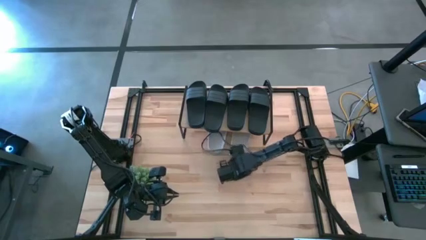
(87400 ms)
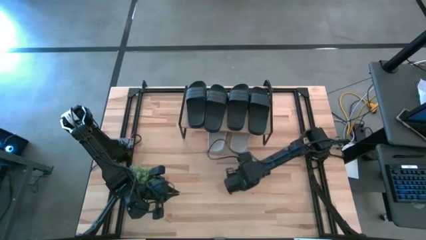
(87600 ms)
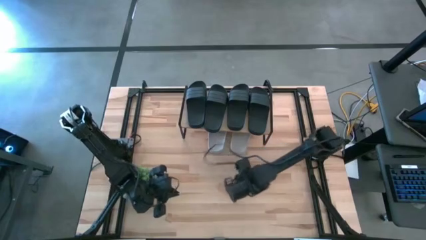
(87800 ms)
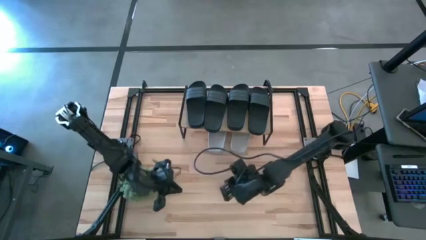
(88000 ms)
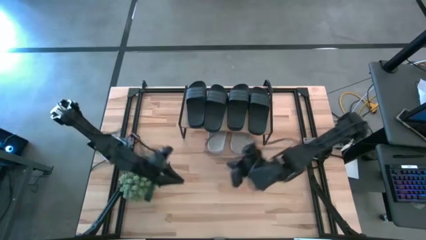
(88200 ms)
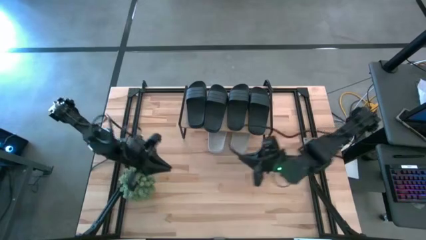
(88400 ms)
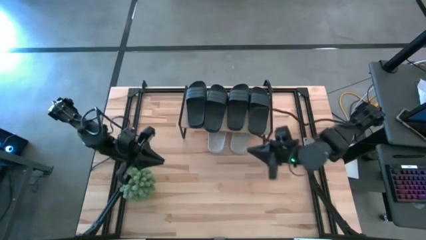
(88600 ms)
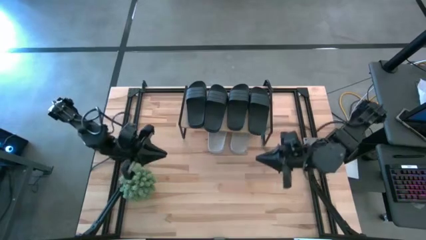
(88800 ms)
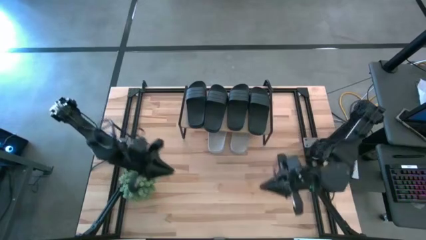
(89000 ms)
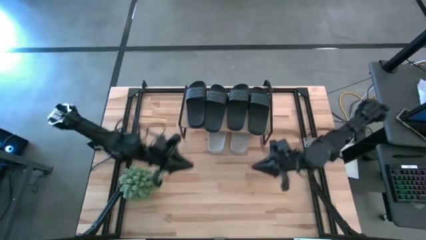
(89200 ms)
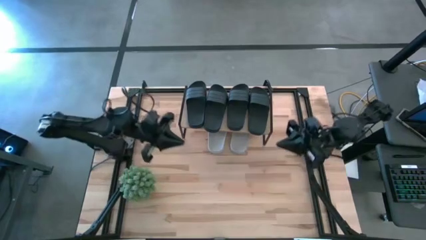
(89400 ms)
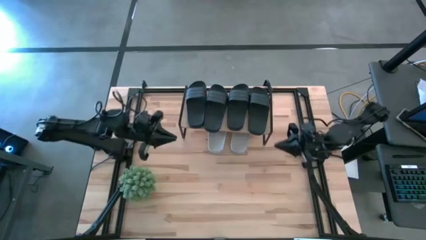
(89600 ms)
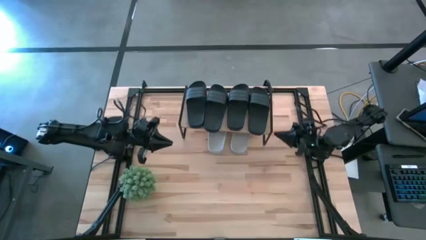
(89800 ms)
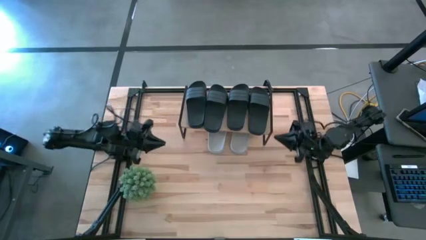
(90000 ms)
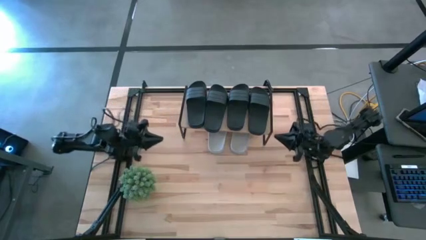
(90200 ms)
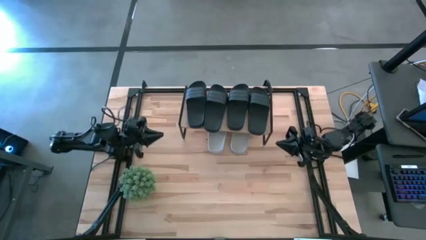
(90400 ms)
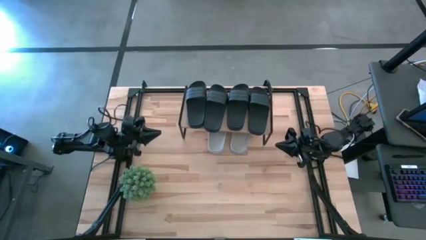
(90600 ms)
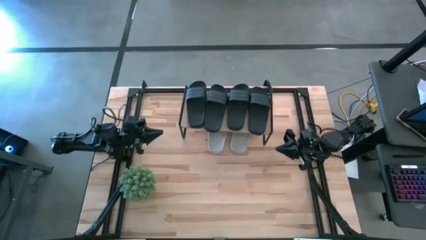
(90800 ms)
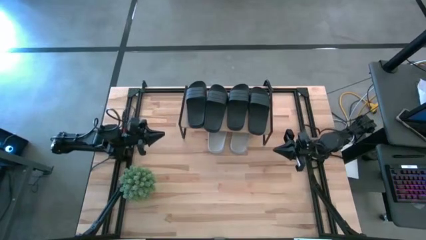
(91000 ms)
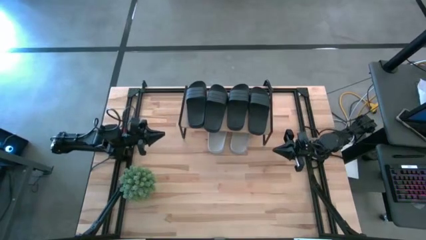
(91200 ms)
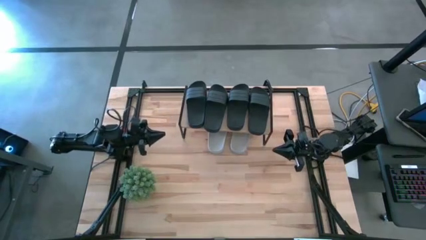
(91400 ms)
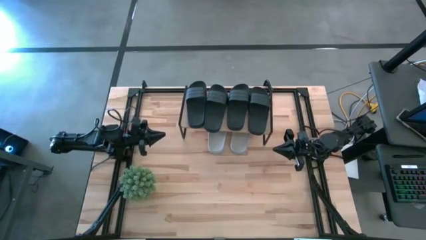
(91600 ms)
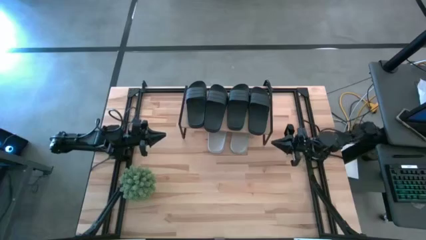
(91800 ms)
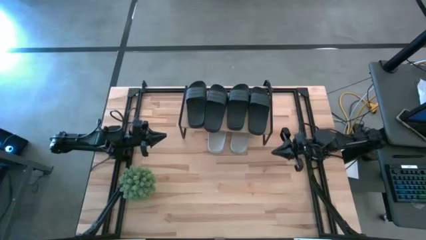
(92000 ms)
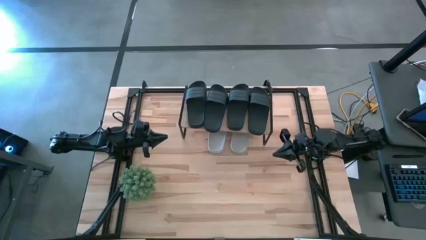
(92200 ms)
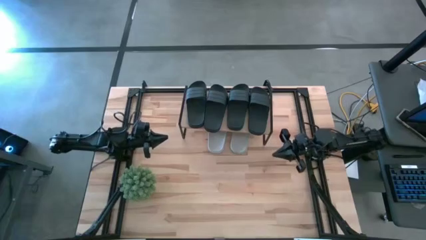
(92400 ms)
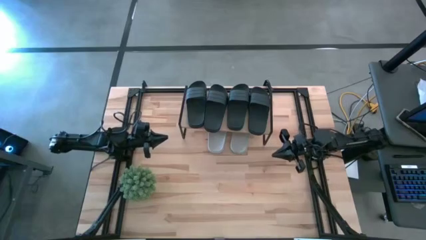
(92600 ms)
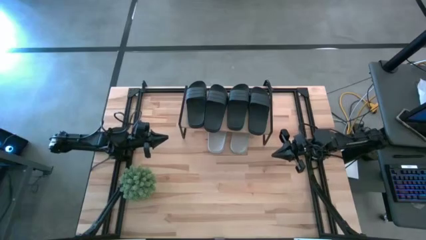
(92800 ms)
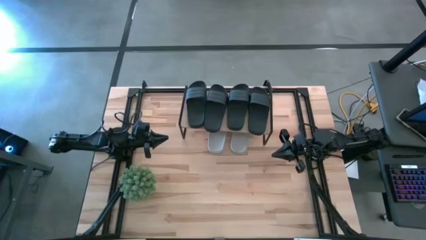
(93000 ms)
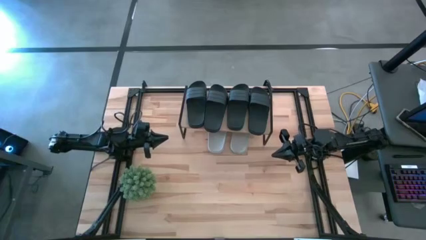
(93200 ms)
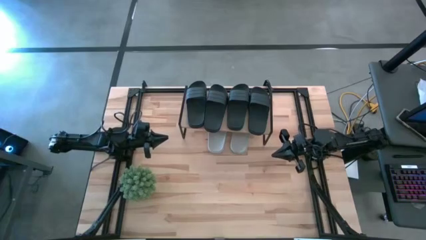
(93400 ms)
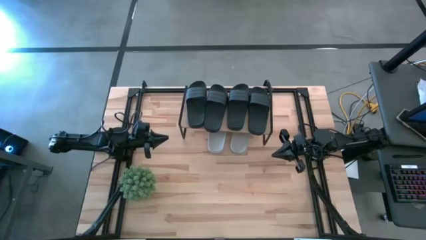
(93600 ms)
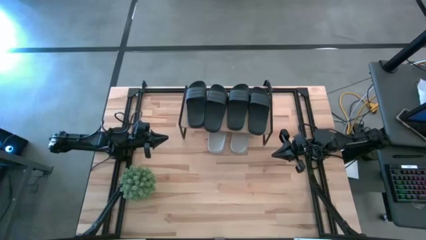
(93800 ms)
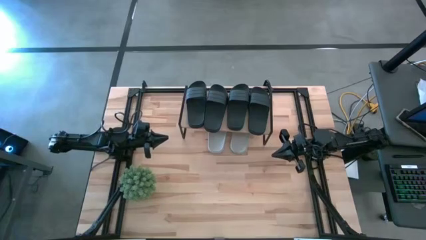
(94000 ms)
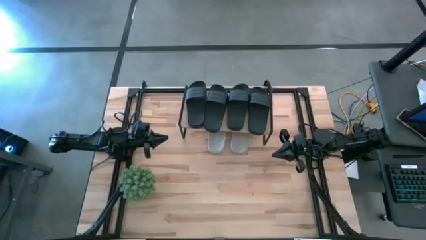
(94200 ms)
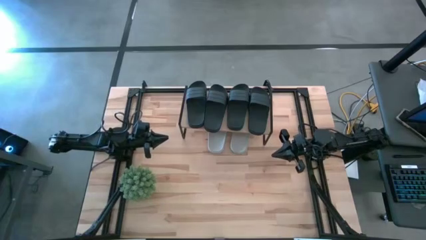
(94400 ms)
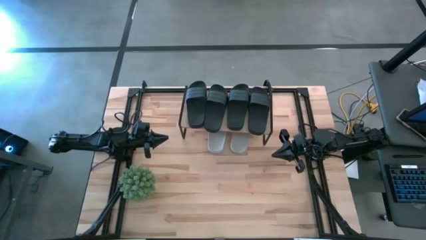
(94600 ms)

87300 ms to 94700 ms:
Task: Pick and place slides into the shelf
Return to Home Position

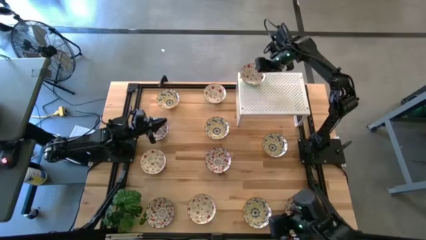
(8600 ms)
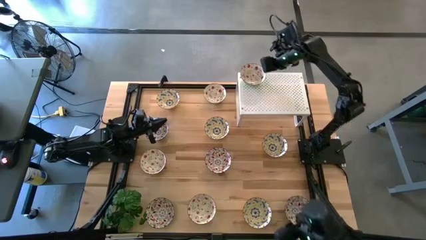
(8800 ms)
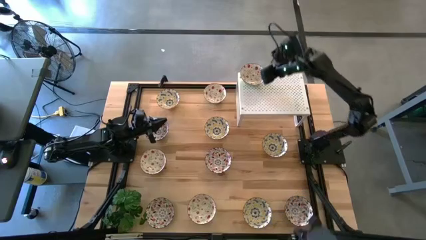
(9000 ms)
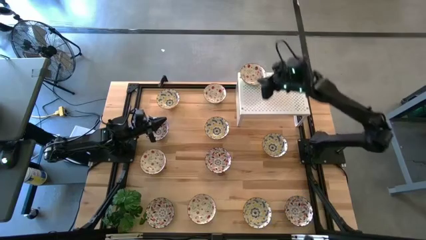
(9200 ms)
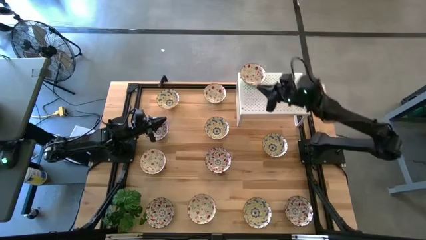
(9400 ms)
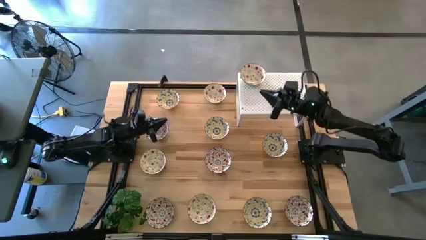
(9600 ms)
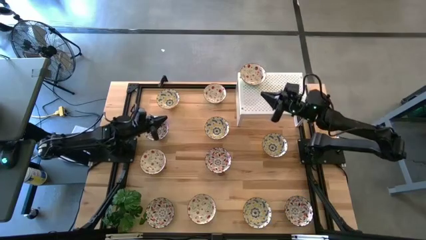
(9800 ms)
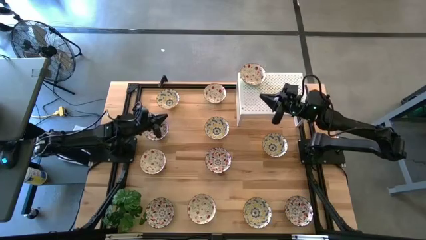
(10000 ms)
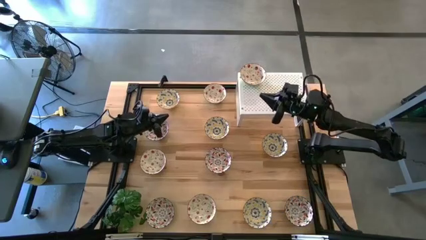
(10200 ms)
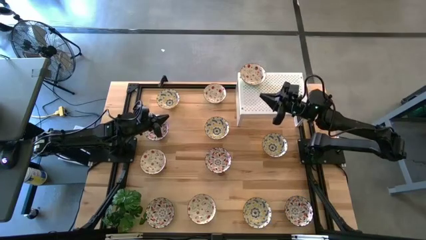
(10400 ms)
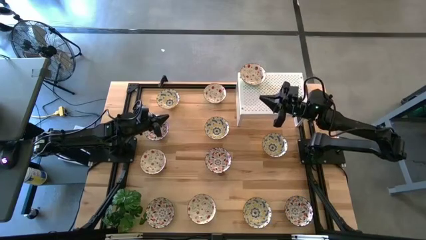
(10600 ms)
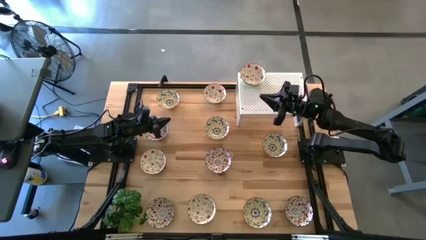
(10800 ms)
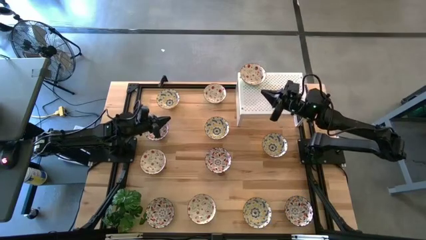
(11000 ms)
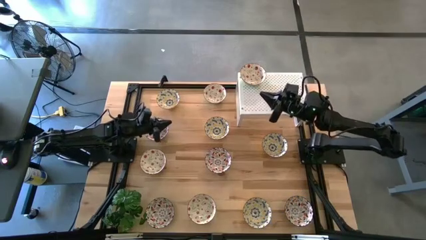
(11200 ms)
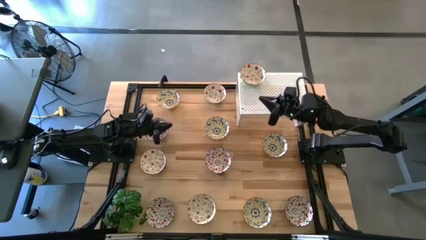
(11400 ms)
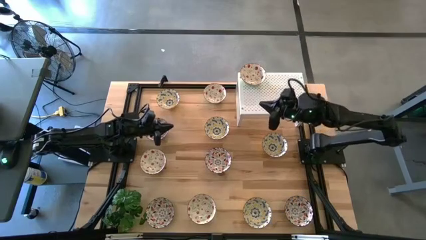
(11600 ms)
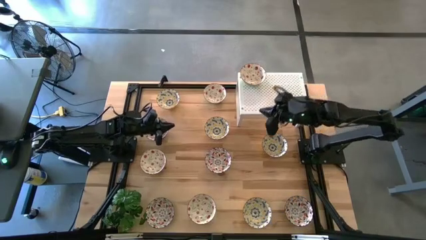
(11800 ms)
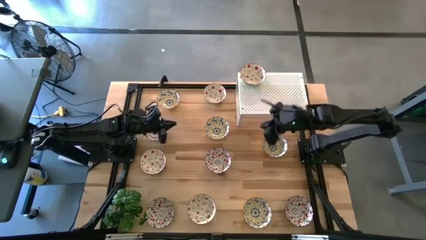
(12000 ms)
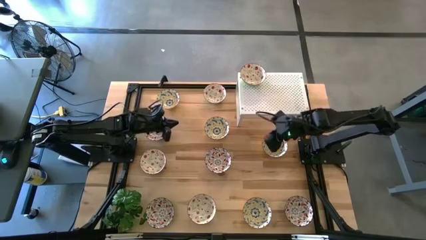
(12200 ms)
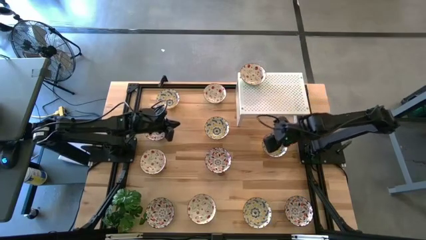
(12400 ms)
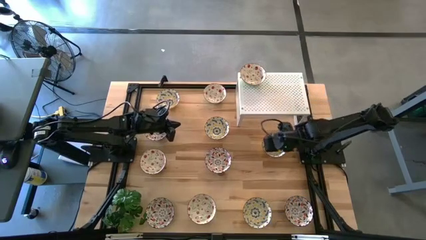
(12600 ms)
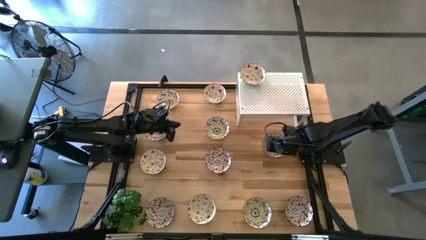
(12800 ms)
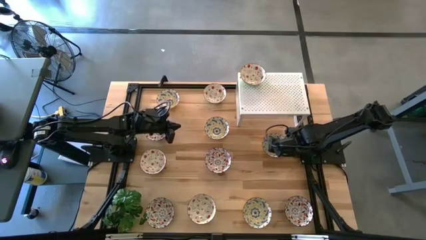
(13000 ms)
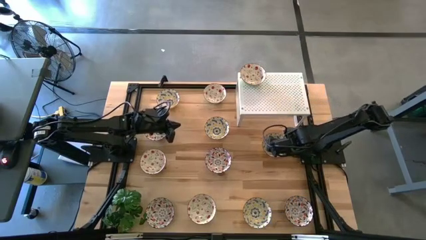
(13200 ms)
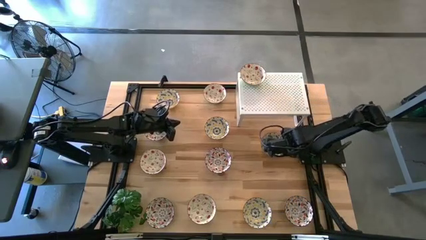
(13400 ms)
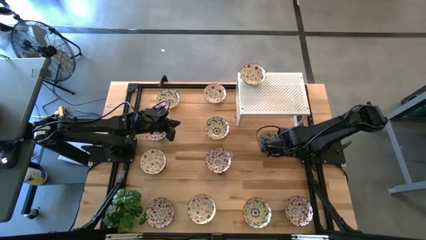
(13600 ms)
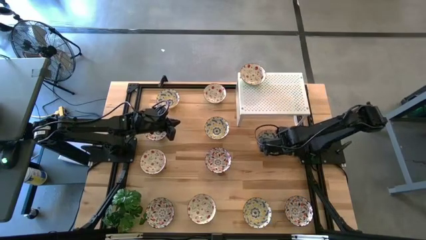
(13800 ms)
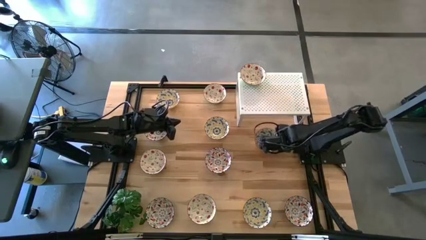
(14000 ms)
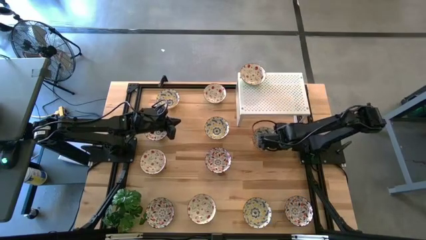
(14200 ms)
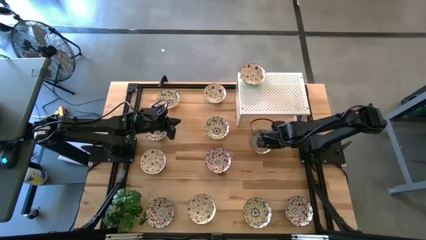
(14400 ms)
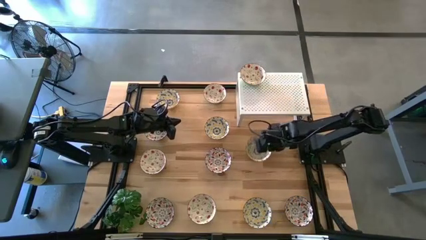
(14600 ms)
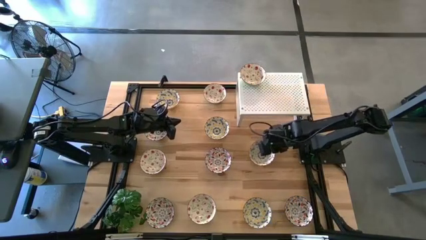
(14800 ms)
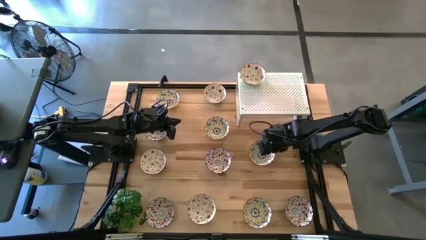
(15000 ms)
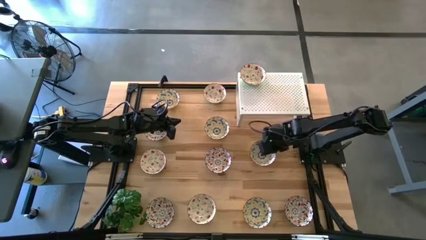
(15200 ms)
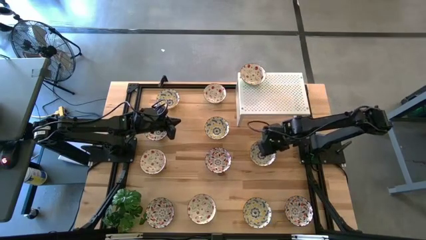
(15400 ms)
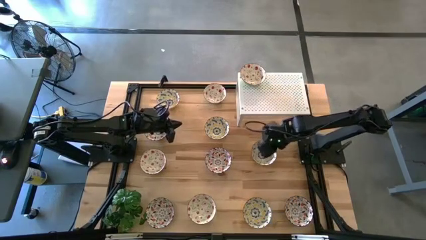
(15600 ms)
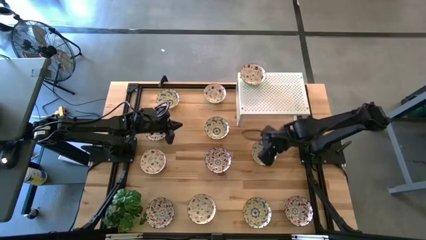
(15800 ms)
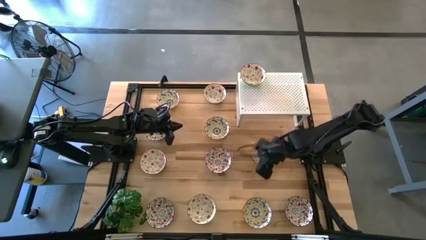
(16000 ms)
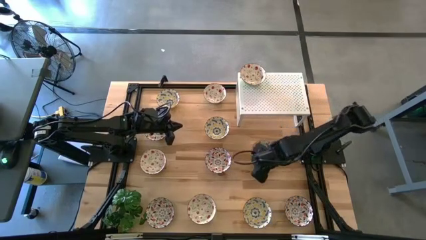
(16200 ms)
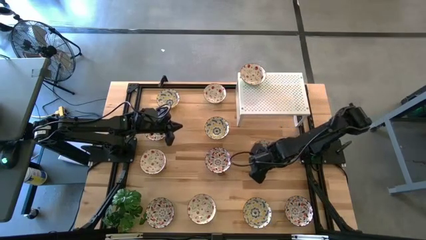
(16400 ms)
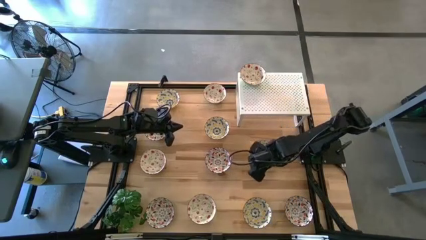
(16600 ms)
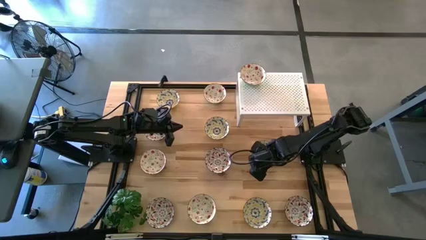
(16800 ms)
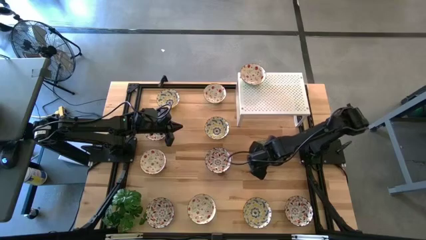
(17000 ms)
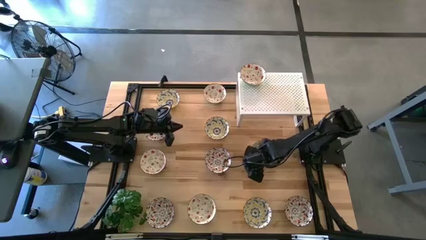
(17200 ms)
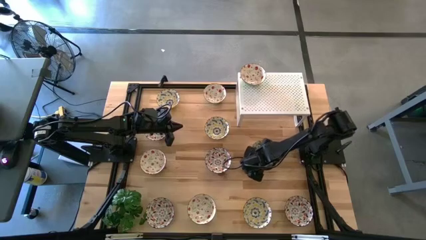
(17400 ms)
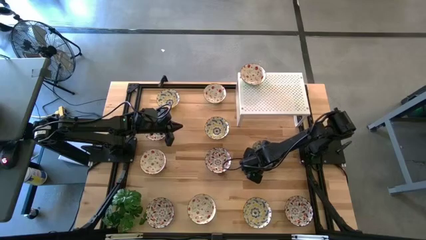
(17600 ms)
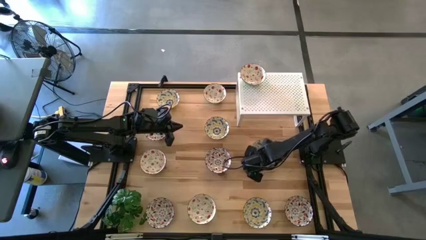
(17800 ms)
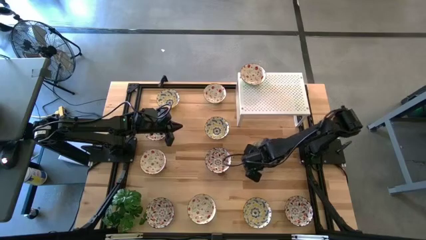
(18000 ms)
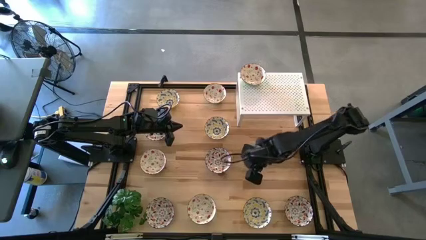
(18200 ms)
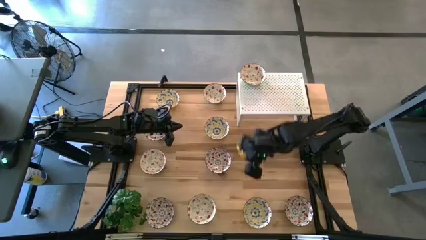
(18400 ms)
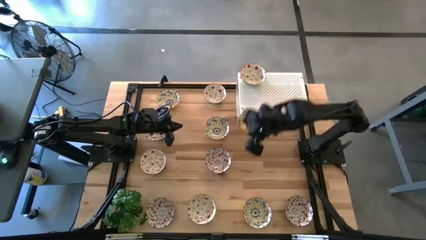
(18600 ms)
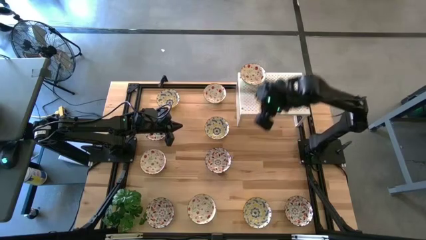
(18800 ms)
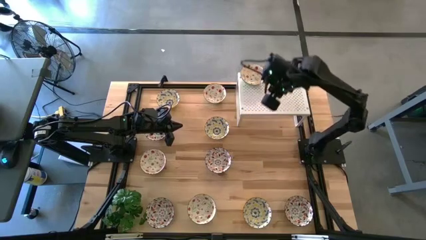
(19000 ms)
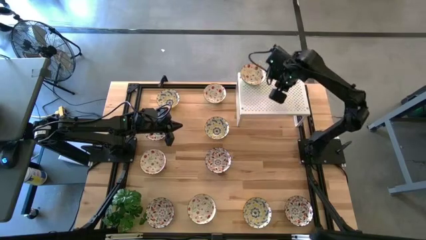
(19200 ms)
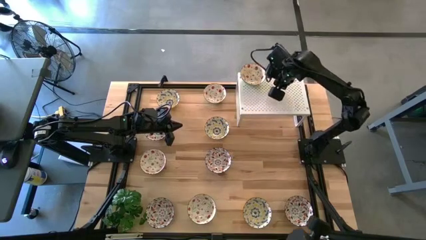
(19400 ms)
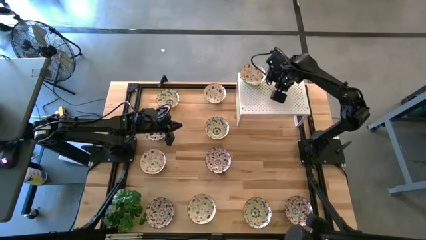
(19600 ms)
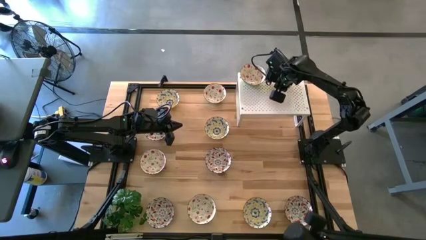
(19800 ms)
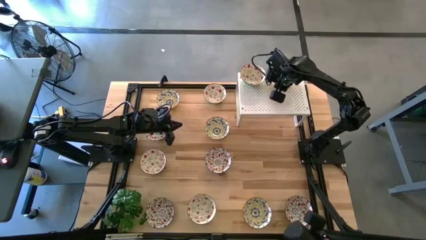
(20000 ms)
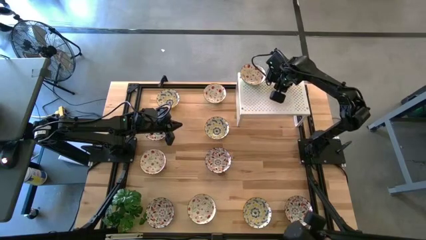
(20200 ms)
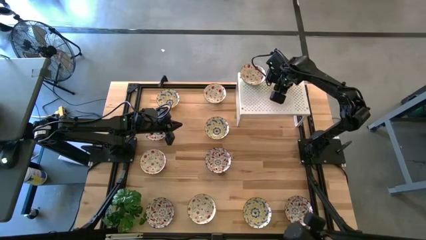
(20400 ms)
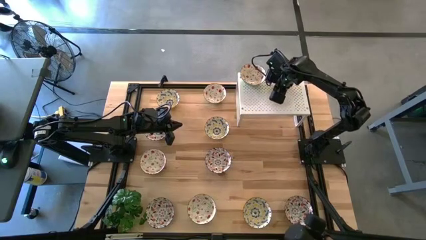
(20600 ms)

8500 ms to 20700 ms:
Task: Pick & Place Mini bowls
Put the yellow patterned bowl on the shelf
